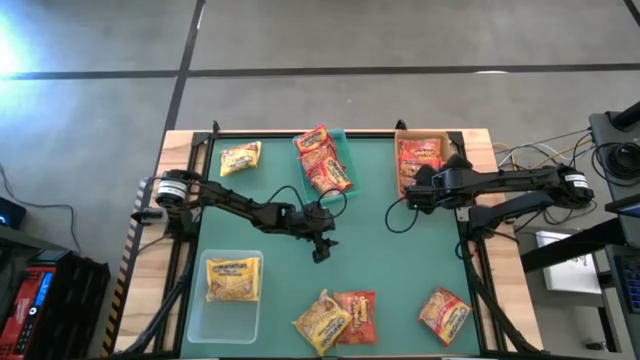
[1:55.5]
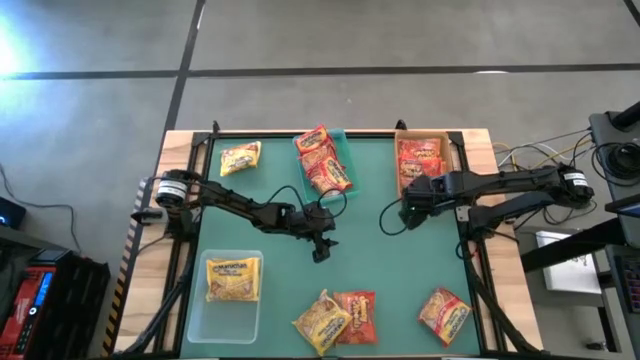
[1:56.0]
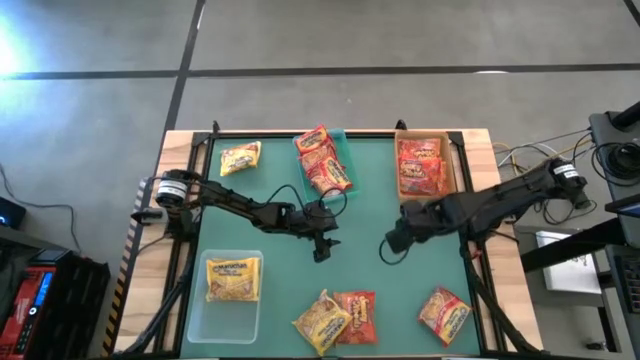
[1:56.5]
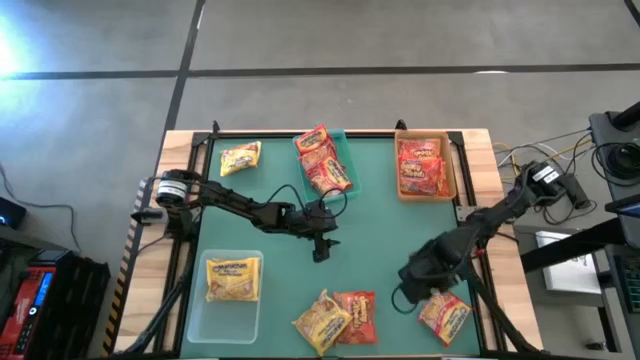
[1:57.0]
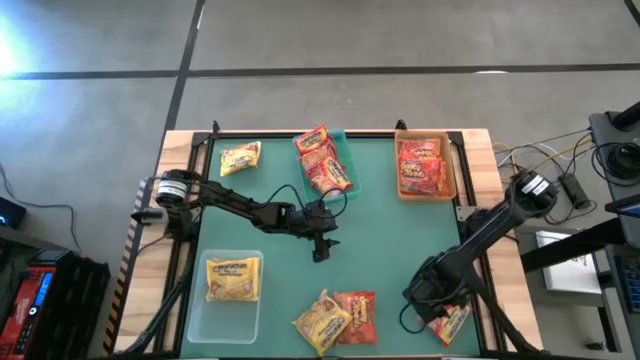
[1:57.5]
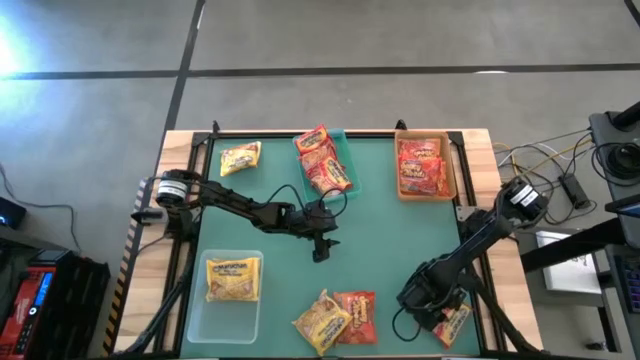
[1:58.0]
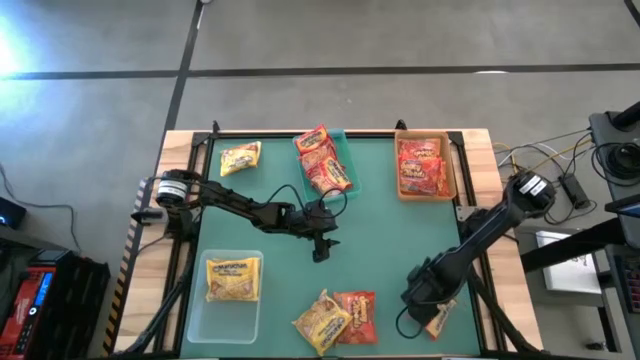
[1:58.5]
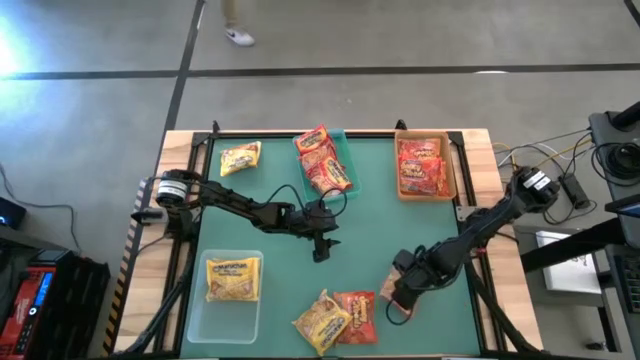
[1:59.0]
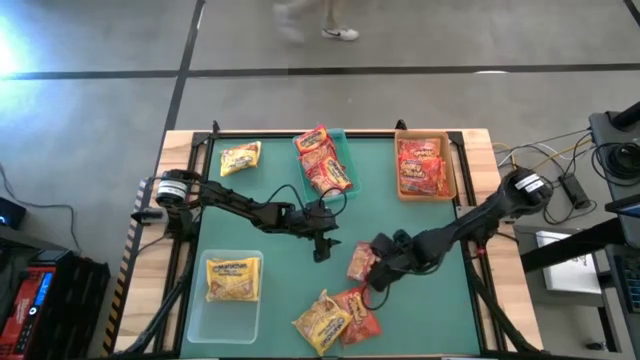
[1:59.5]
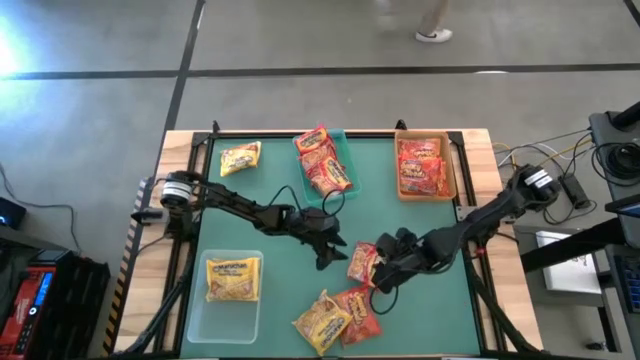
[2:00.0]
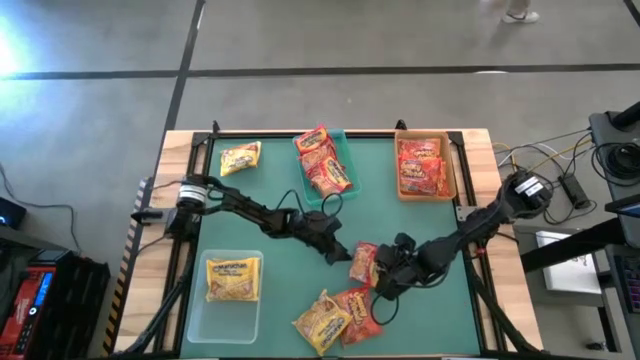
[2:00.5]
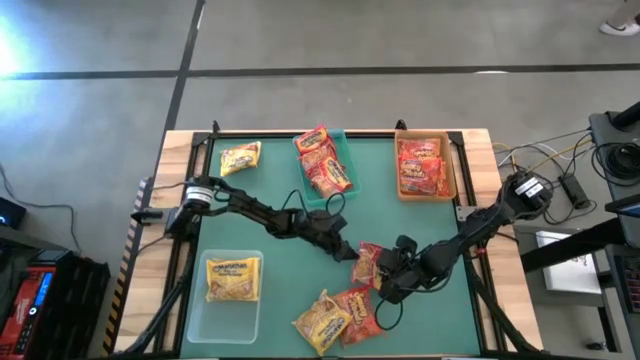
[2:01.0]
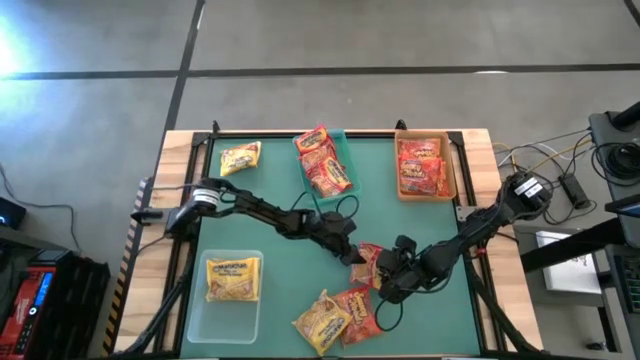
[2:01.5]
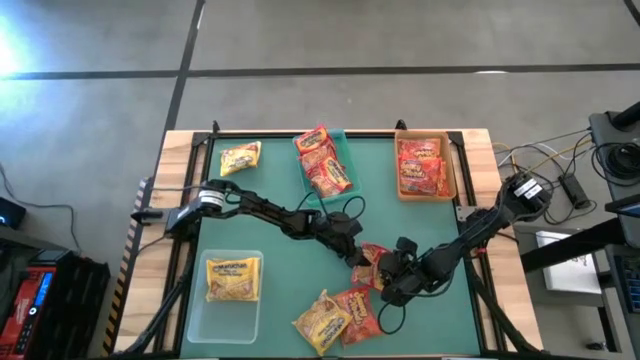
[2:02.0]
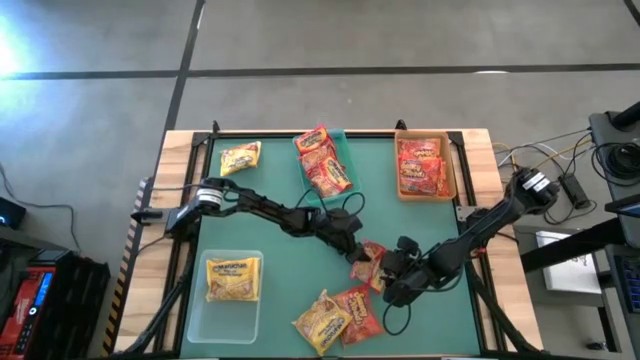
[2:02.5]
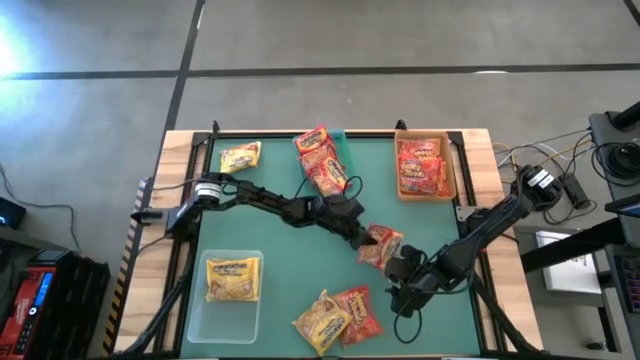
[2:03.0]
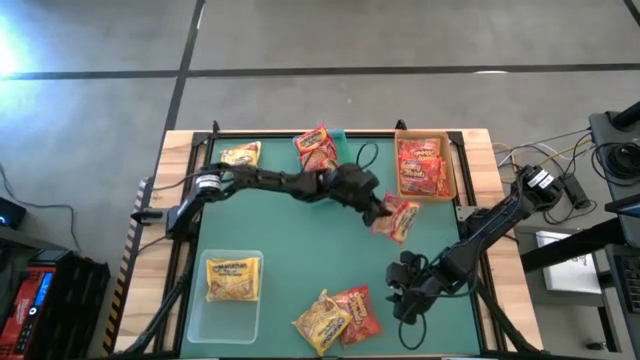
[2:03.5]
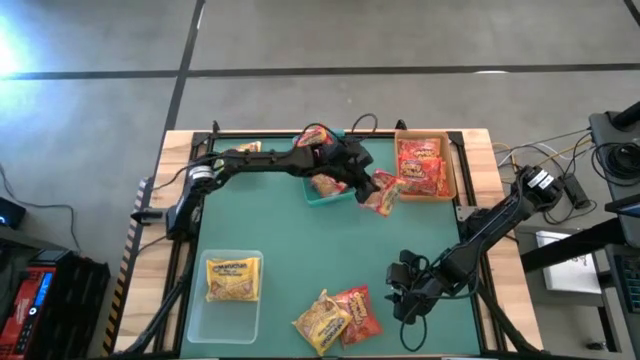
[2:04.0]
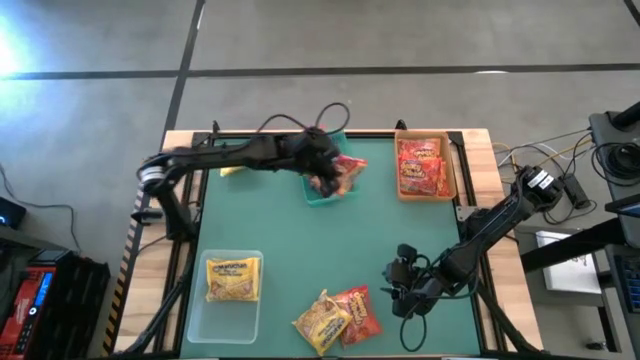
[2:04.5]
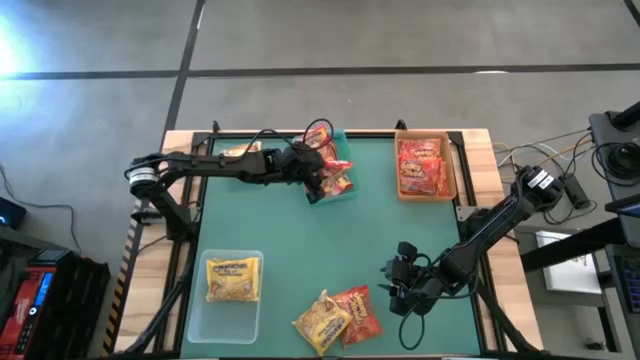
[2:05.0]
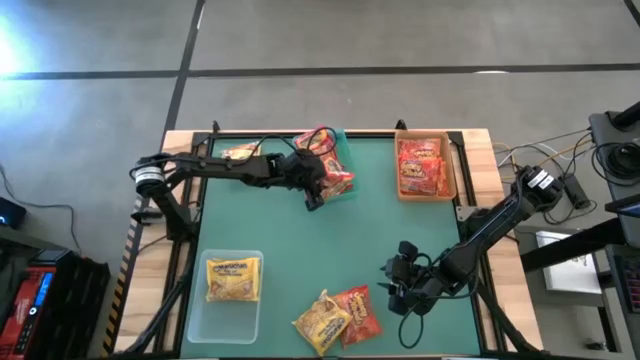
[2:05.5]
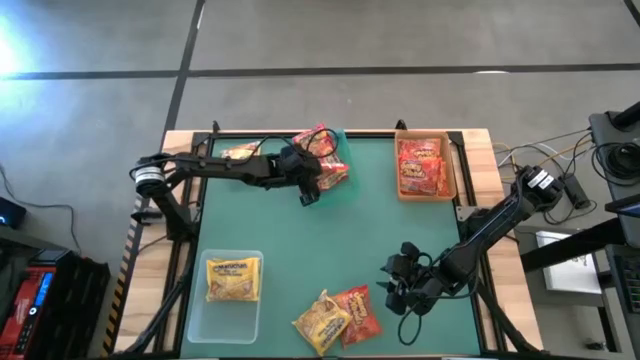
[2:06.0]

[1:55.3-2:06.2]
Task: Sort Maruchan noodles
Put the red noodle pack into the green bin

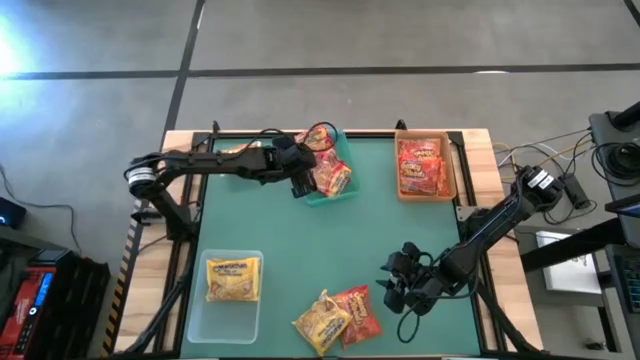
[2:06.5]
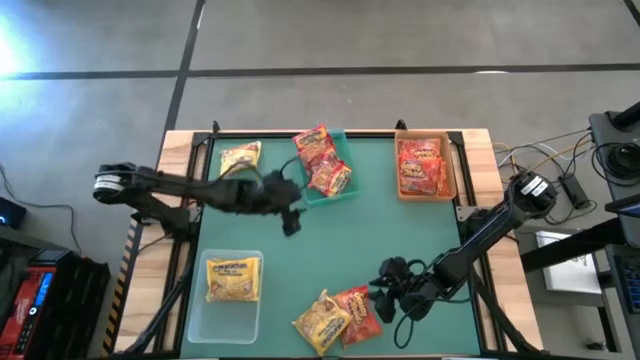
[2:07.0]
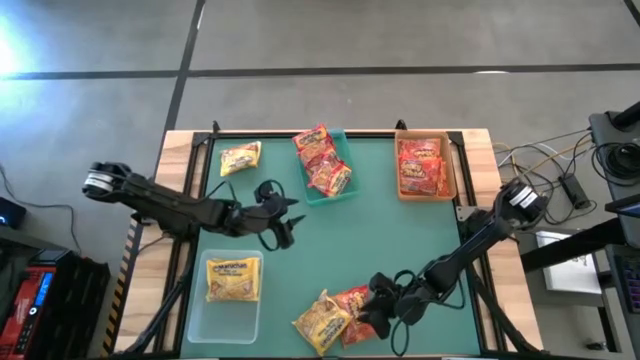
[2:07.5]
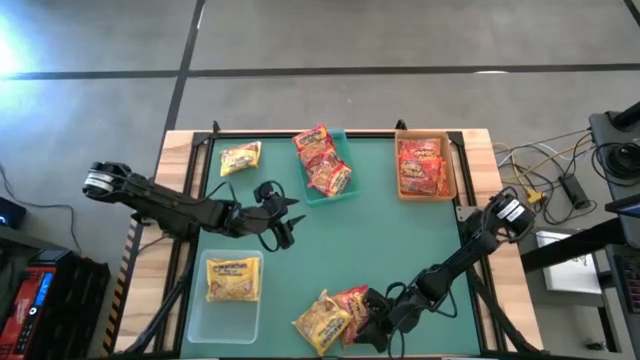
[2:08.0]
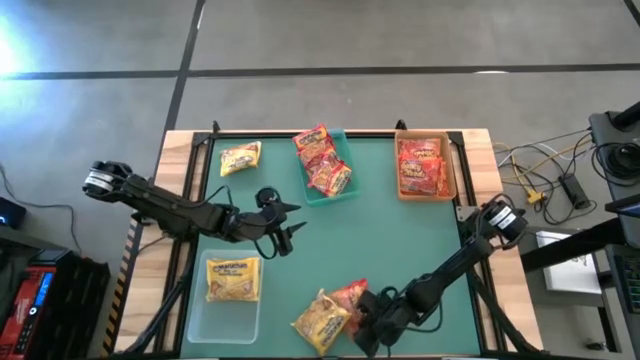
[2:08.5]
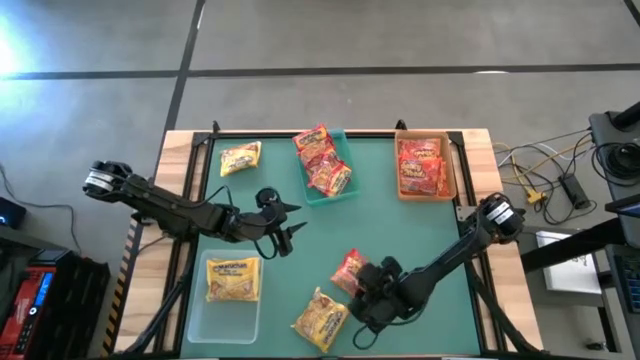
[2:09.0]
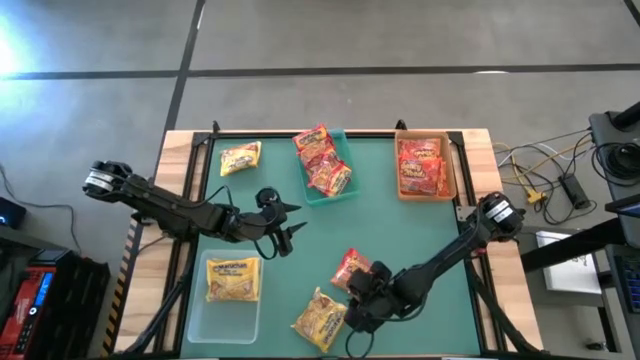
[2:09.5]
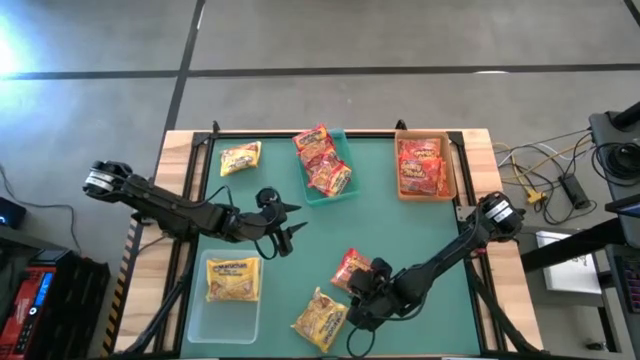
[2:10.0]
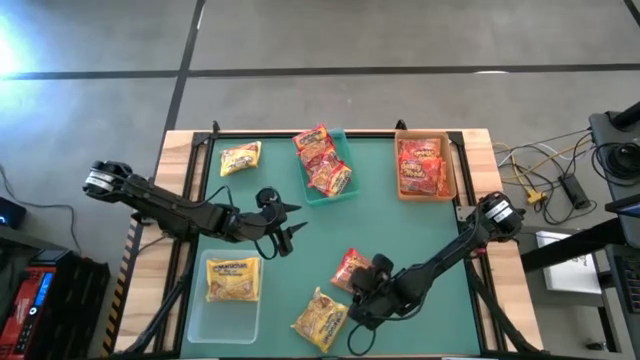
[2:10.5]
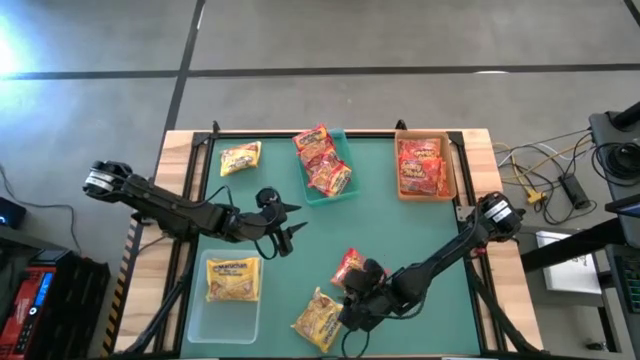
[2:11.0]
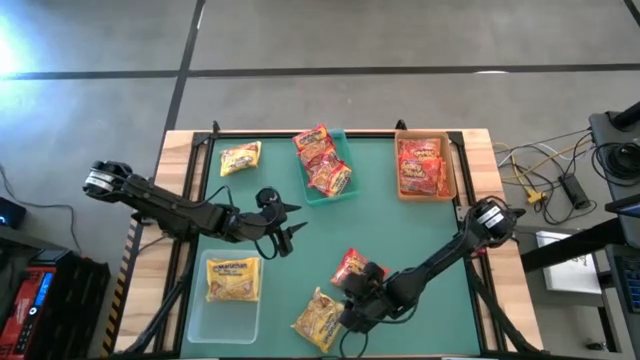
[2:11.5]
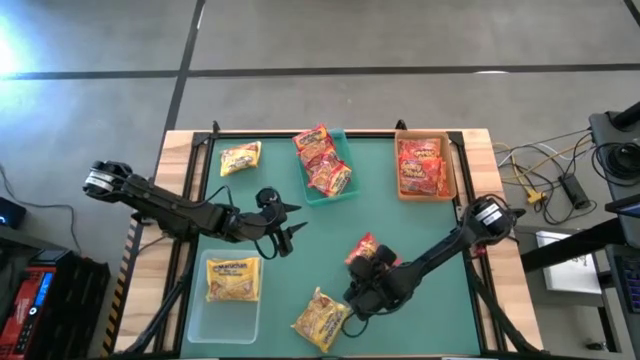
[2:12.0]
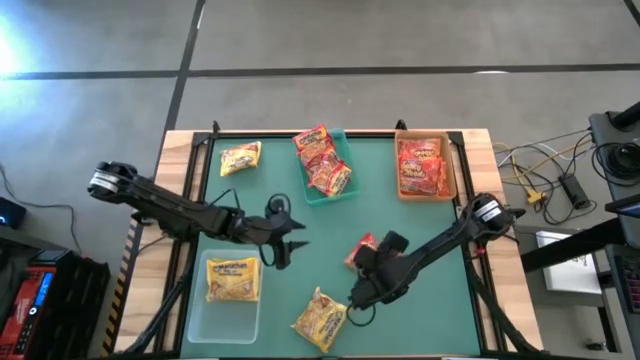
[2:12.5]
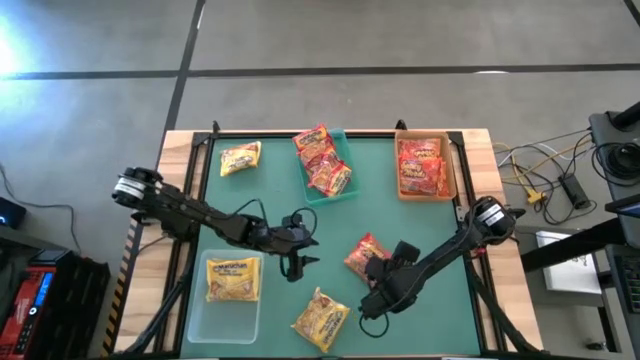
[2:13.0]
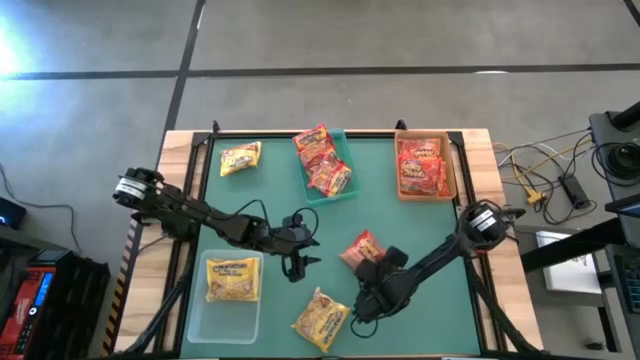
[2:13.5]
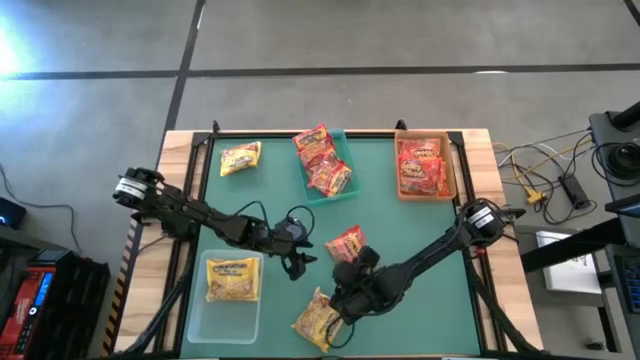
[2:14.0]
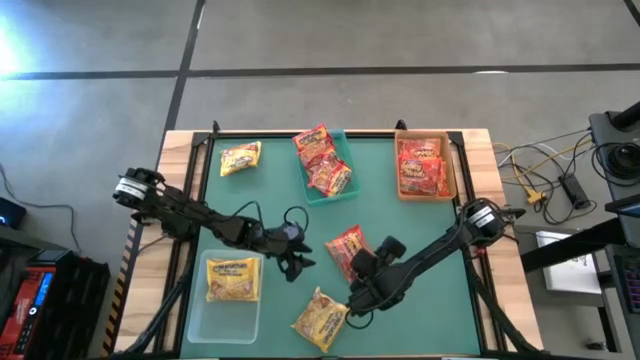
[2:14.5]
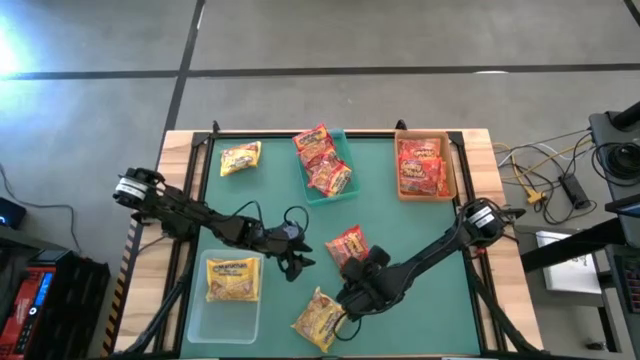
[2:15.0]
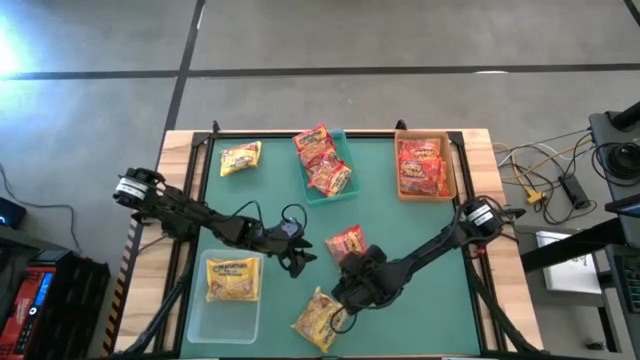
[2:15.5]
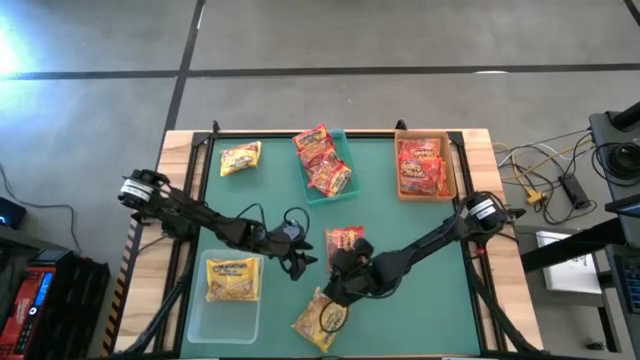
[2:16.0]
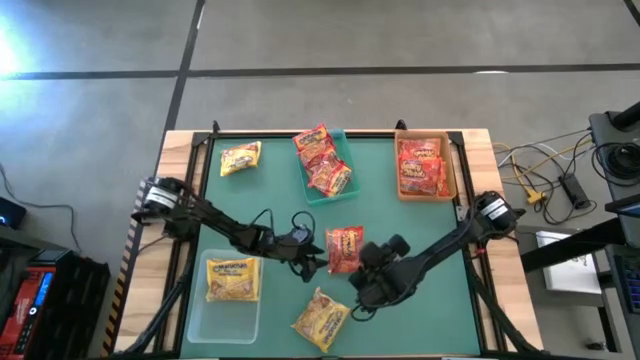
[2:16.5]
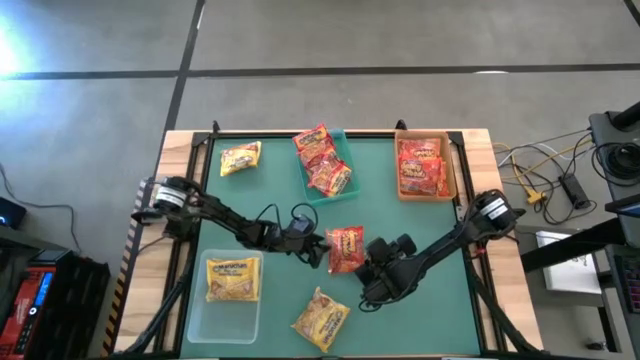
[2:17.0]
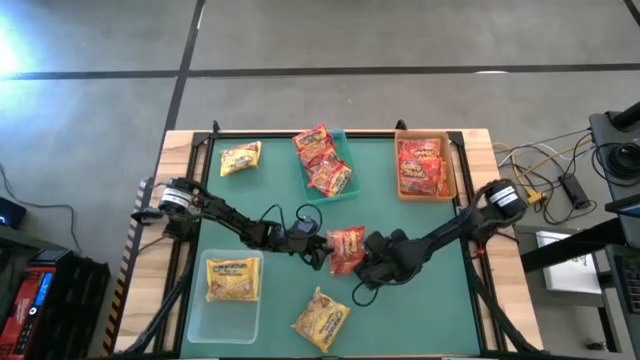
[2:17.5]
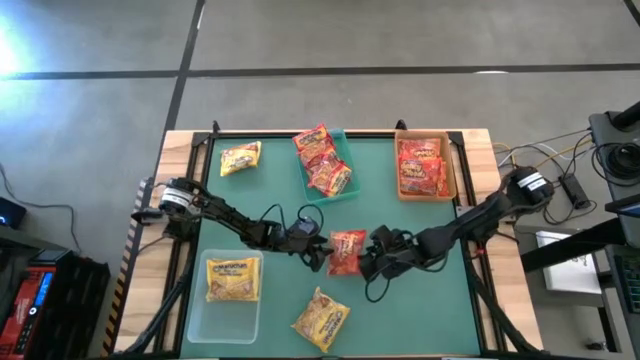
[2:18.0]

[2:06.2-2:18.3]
Put the orange noodle pack into the orange bin
